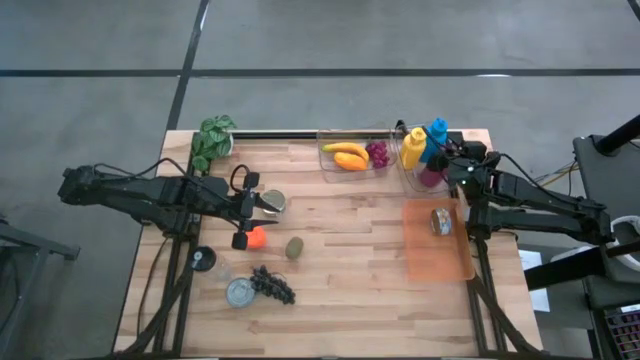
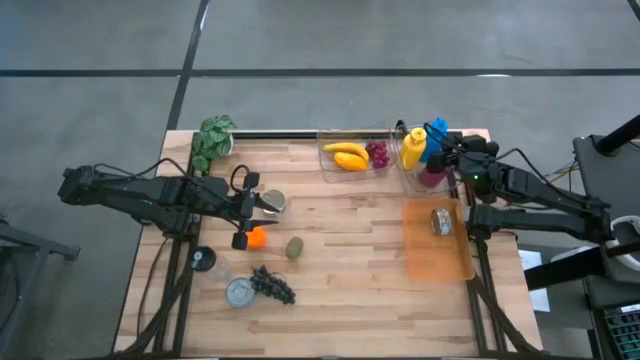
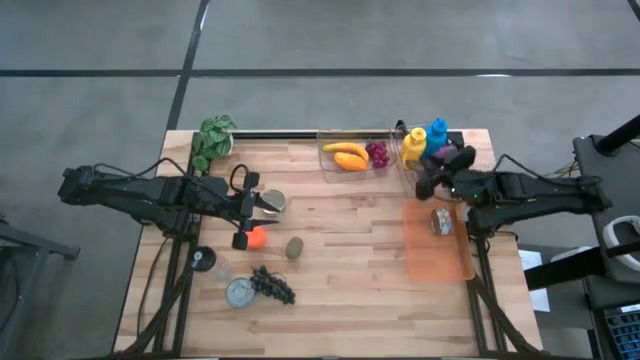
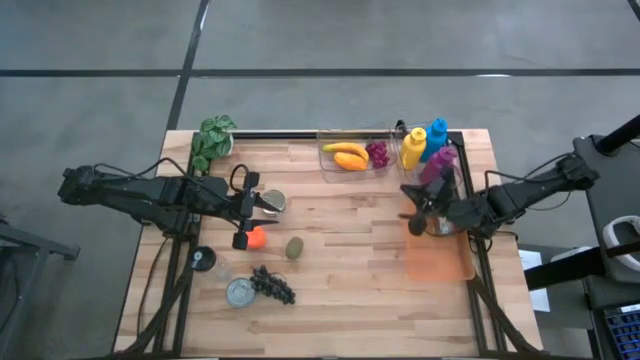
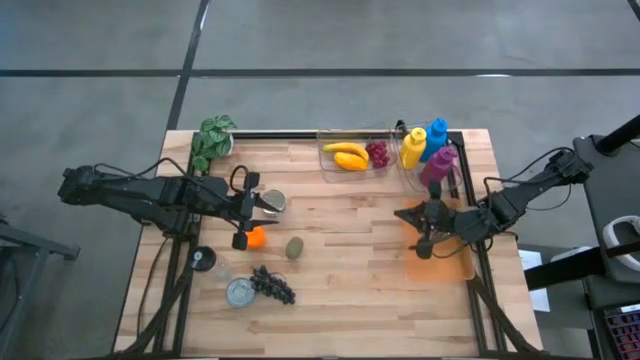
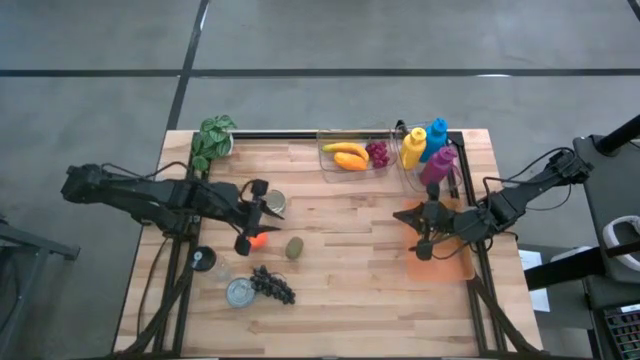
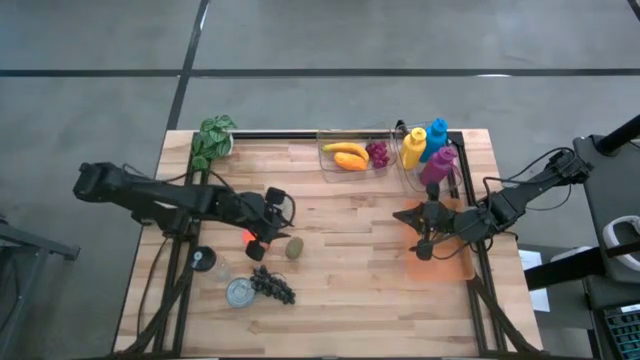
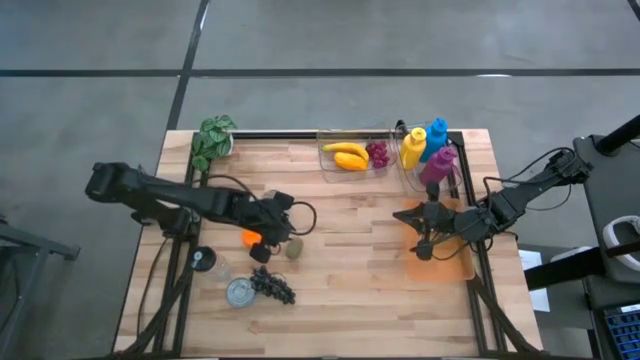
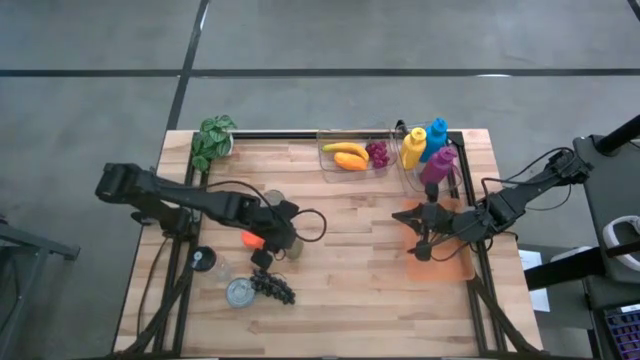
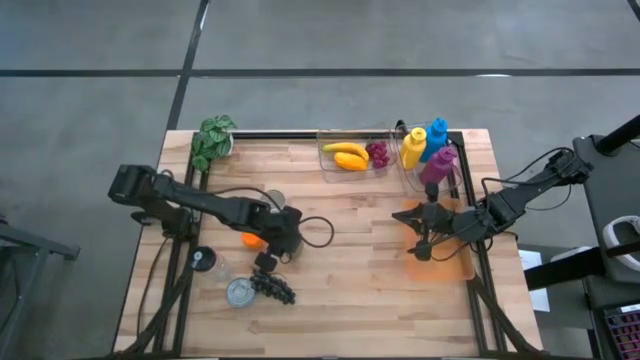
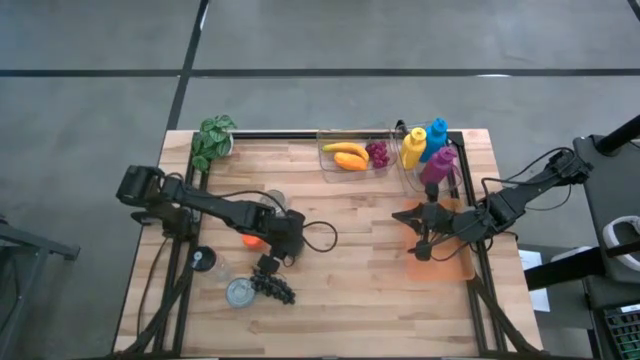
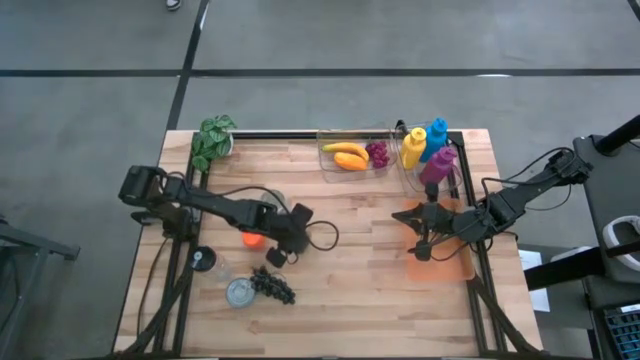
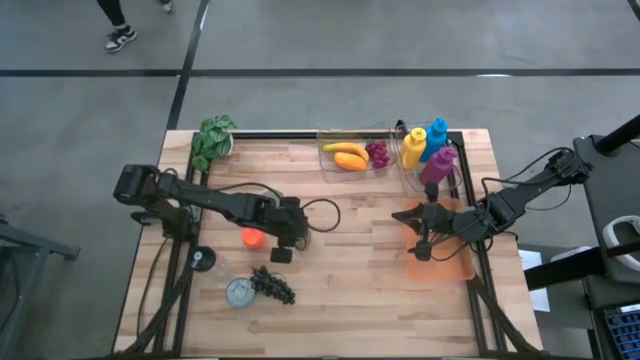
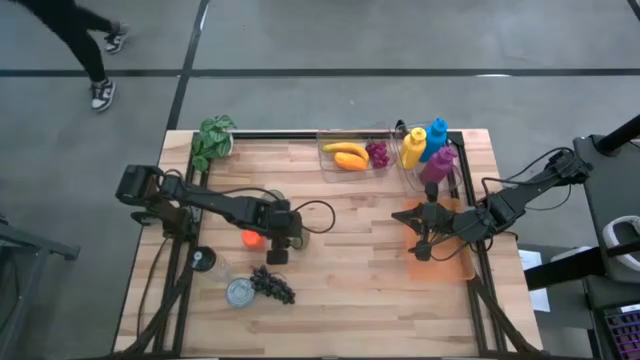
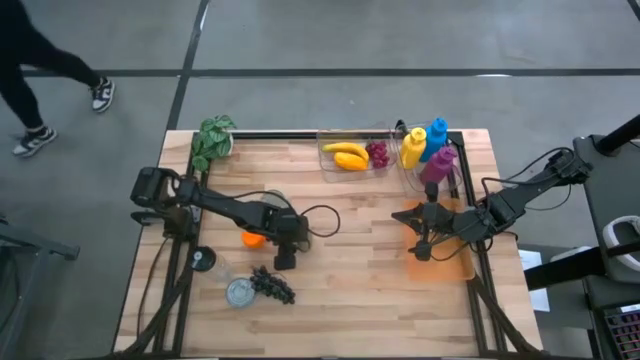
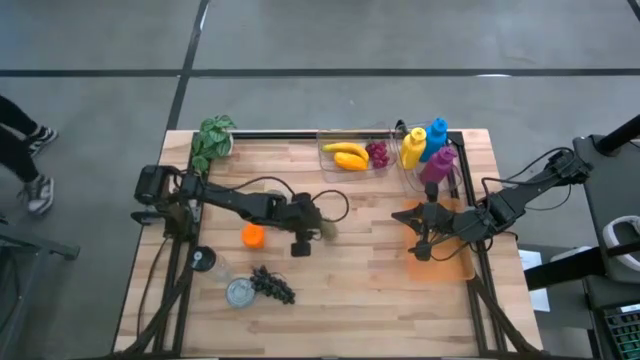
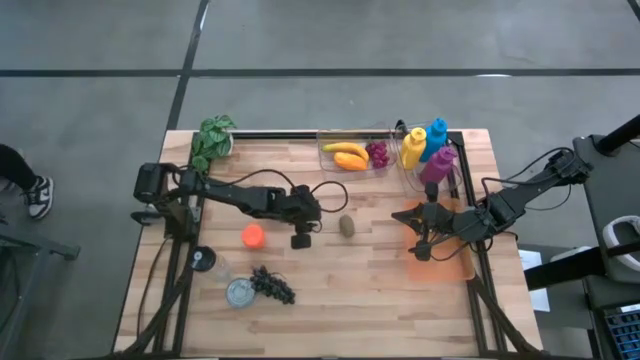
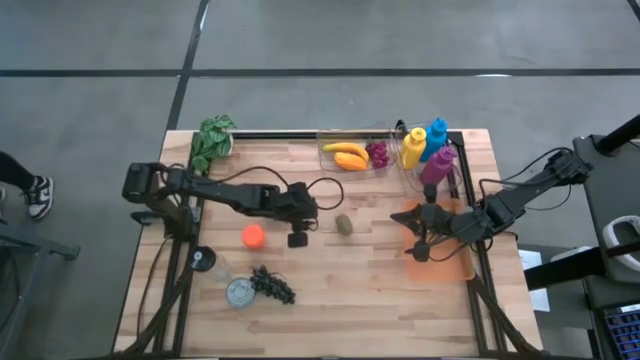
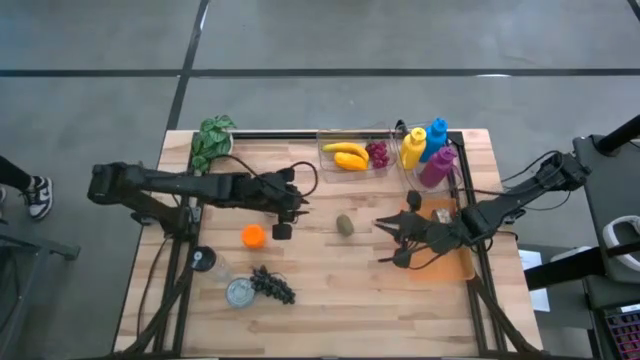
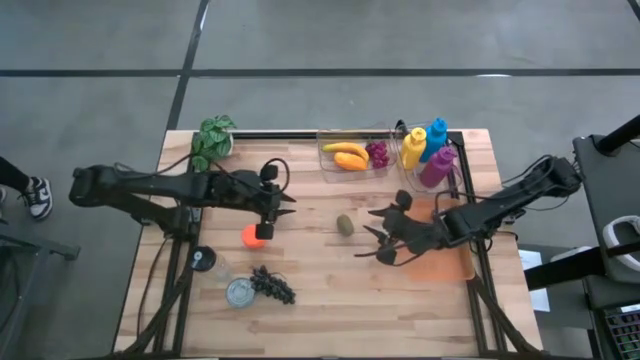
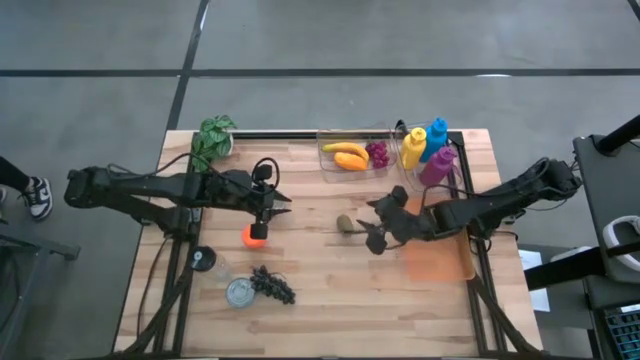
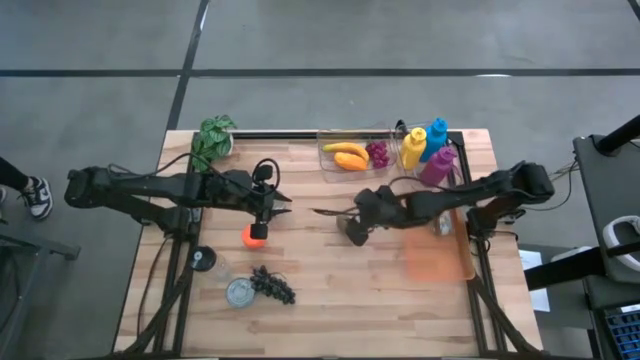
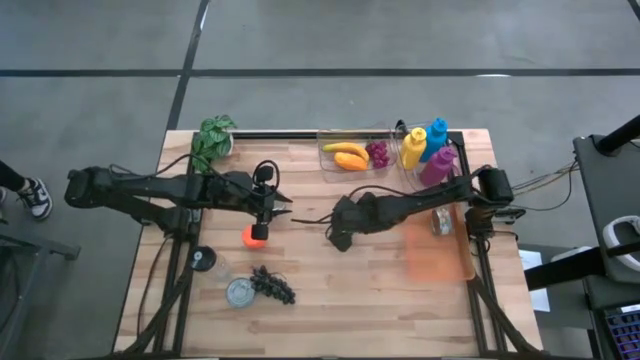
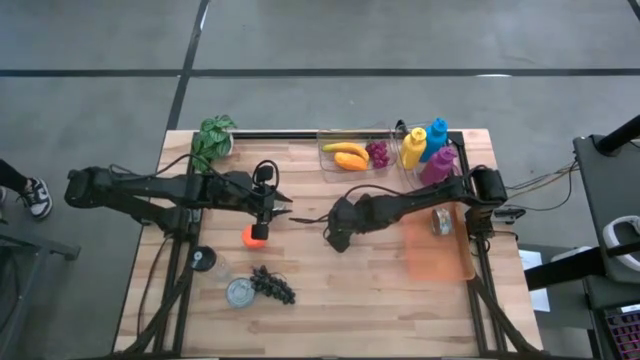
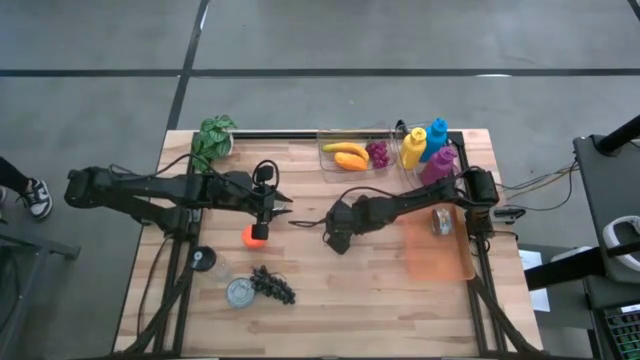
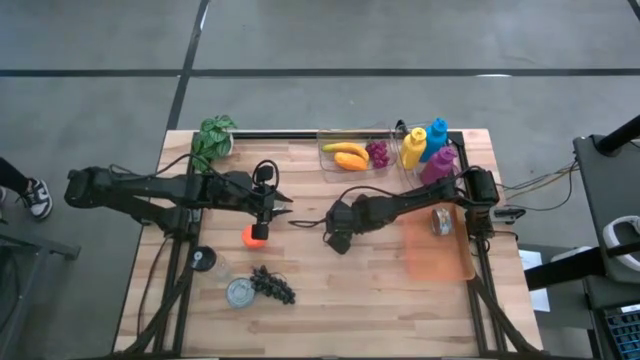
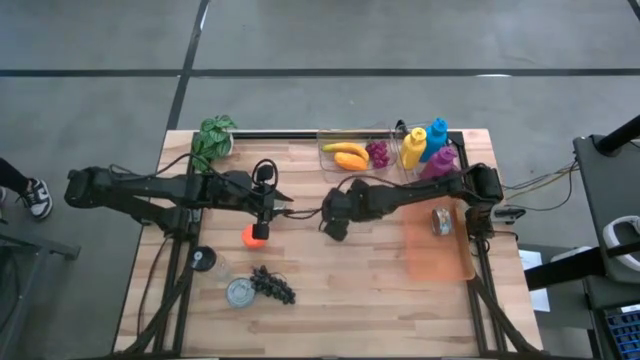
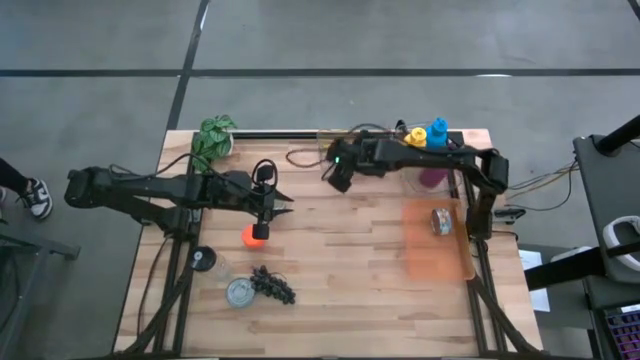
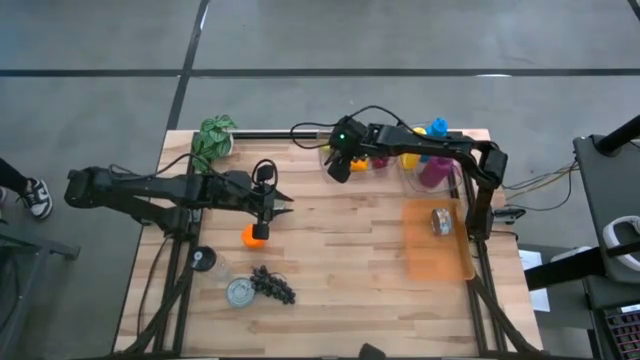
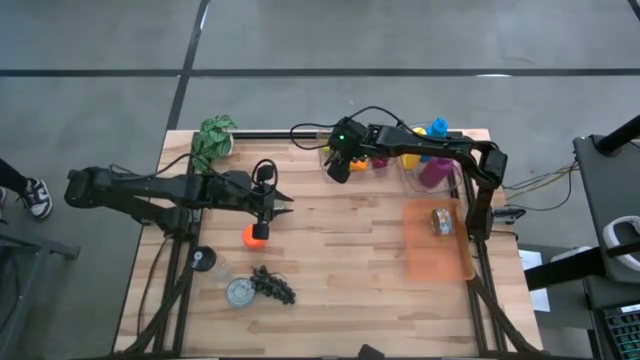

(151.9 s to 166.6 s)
Task: Pick & Place Food Item
Put the dark green kiwi into the left transparent bin

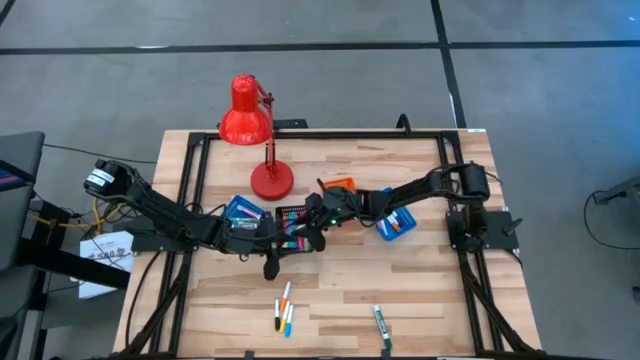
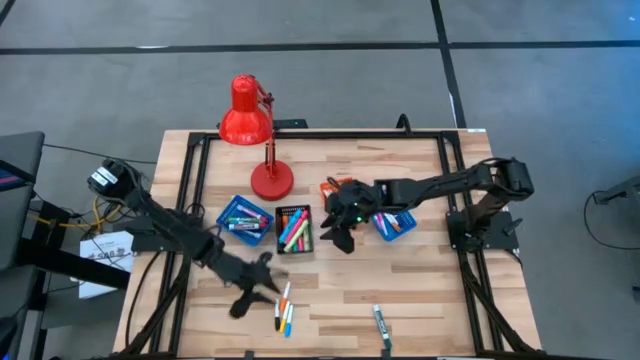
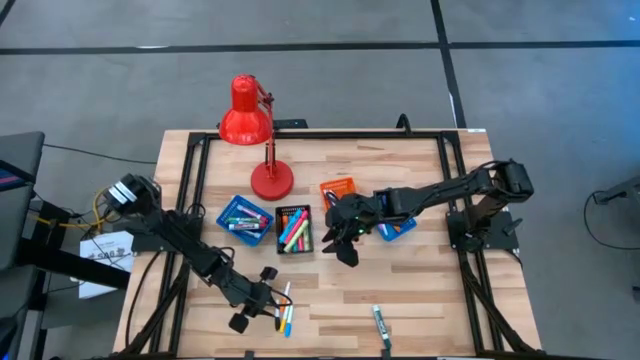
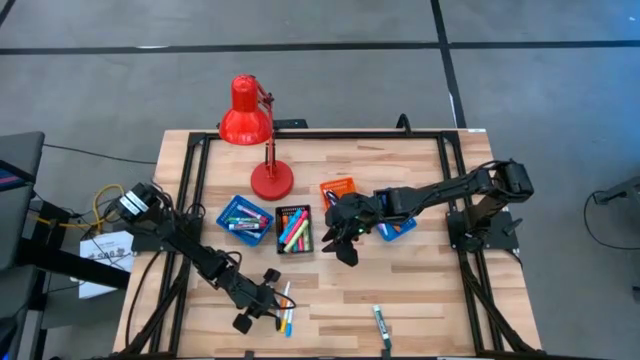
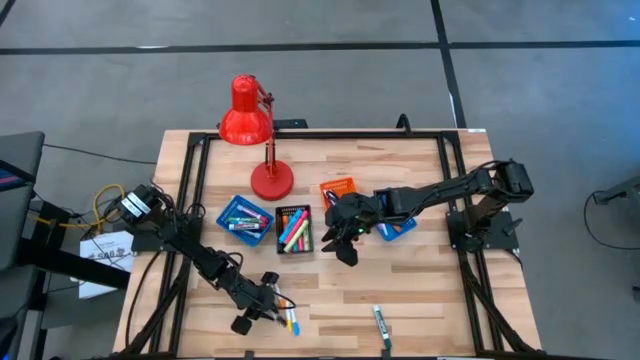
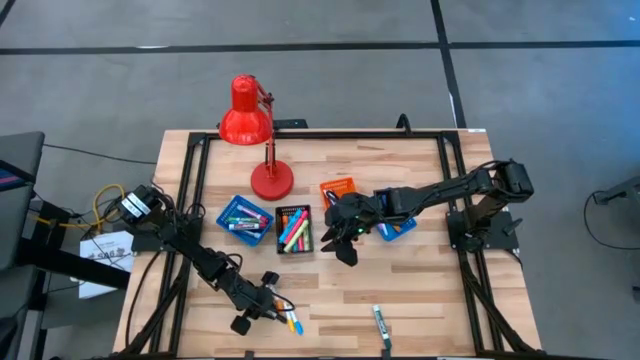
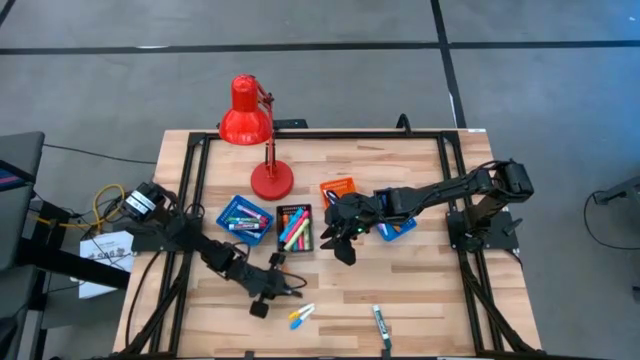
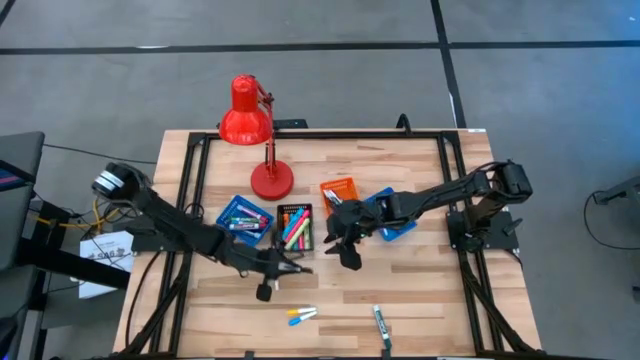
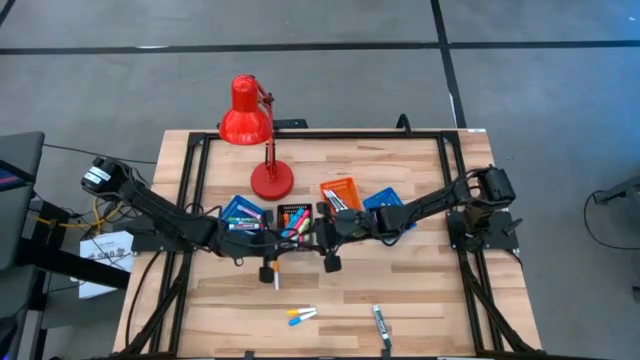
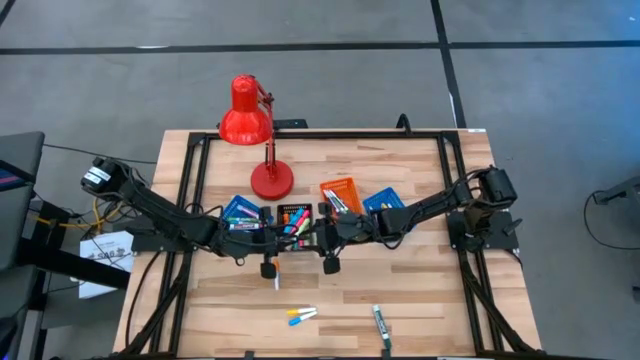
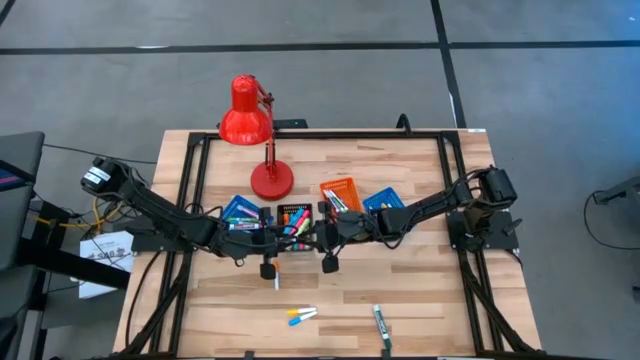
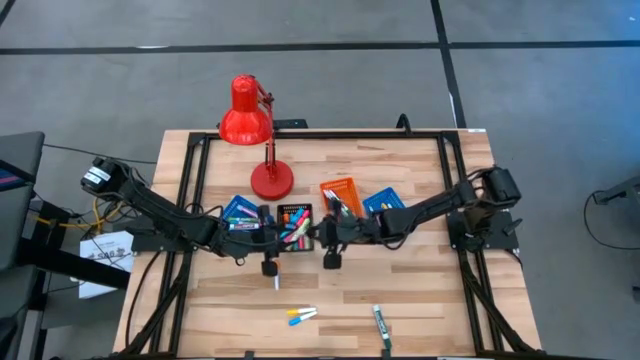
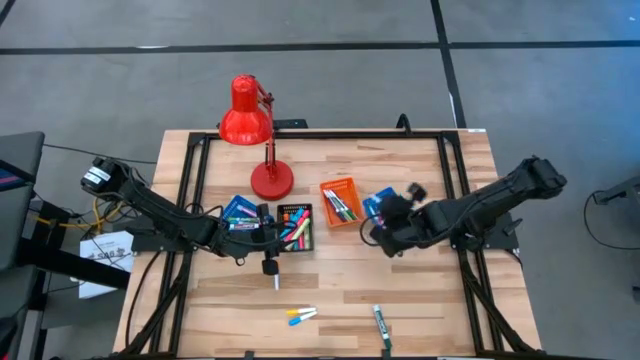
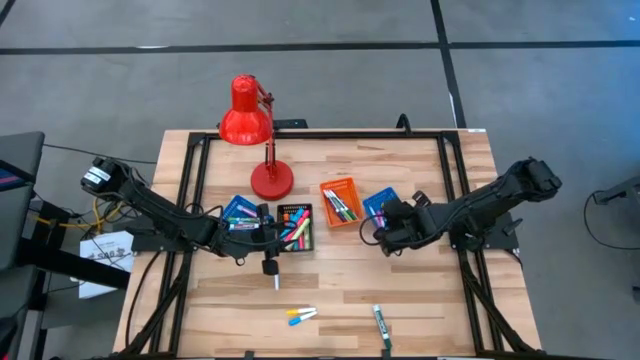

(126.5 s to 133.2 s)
Task: Pick & Place Markers
Put the small white and black highlighter pen into the right blue basket
